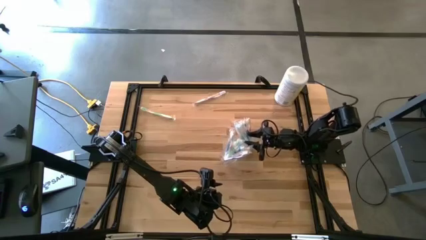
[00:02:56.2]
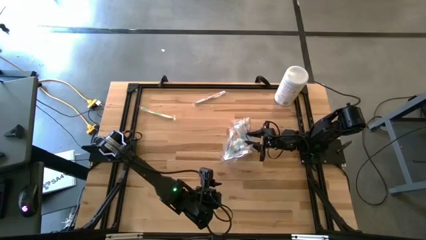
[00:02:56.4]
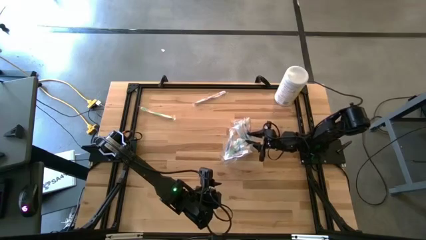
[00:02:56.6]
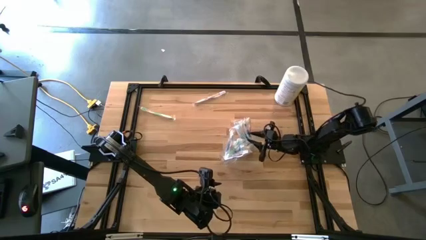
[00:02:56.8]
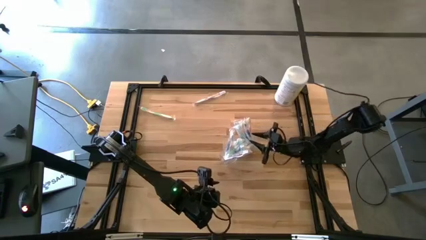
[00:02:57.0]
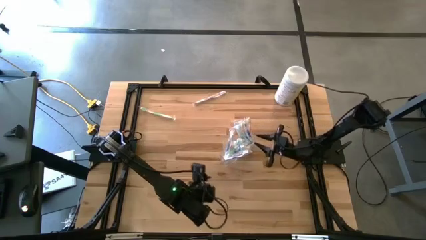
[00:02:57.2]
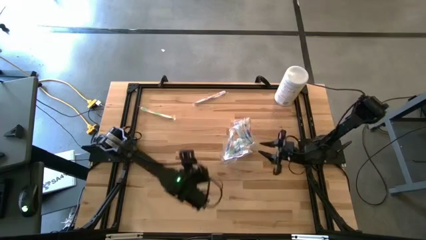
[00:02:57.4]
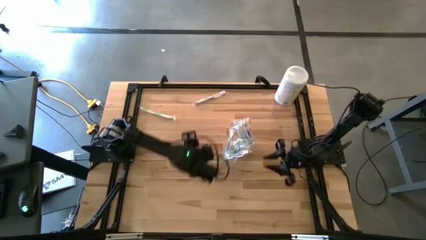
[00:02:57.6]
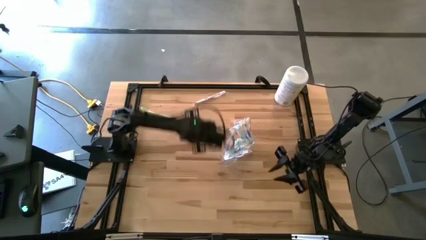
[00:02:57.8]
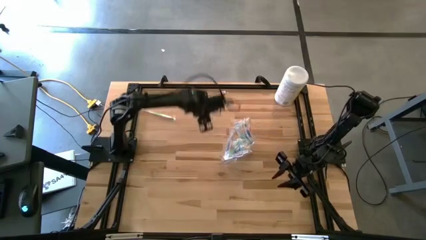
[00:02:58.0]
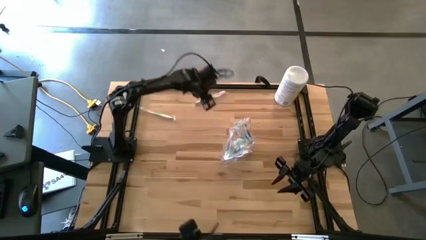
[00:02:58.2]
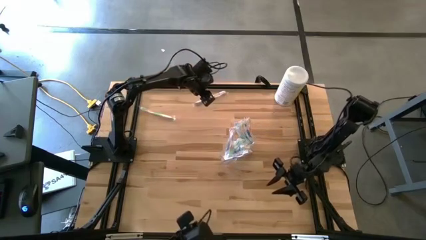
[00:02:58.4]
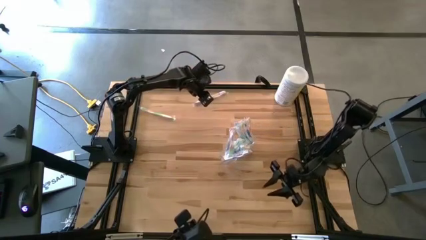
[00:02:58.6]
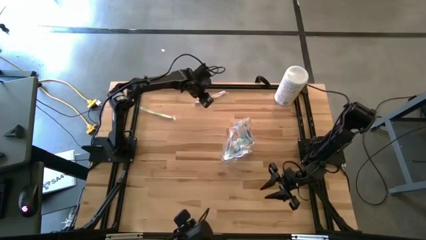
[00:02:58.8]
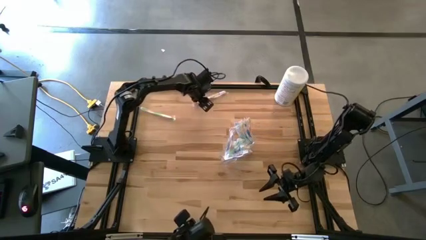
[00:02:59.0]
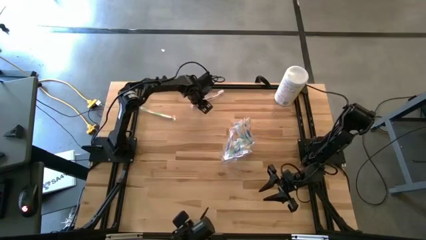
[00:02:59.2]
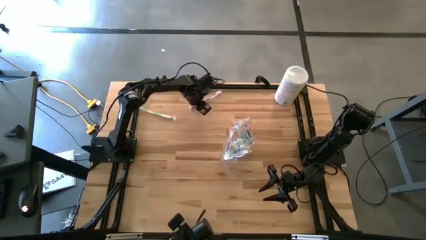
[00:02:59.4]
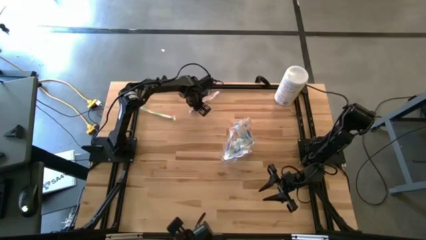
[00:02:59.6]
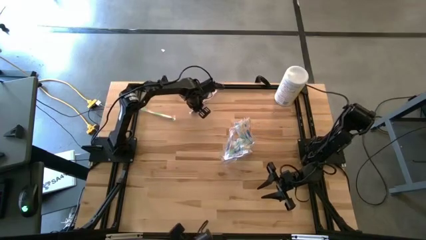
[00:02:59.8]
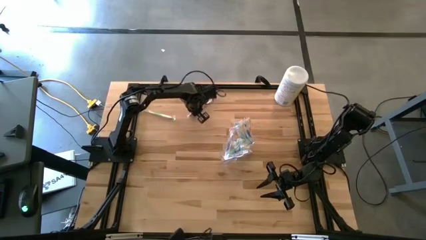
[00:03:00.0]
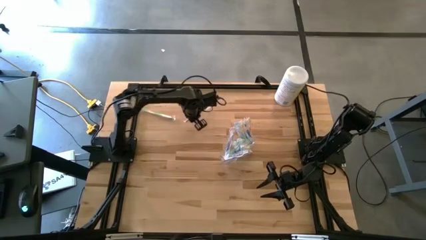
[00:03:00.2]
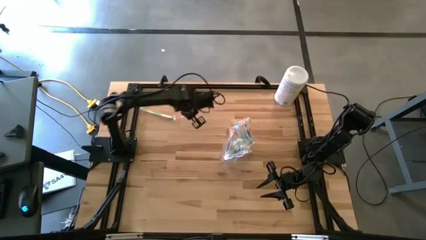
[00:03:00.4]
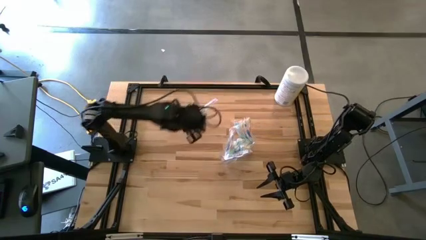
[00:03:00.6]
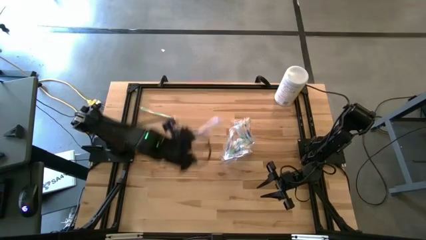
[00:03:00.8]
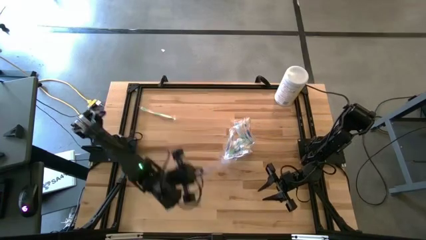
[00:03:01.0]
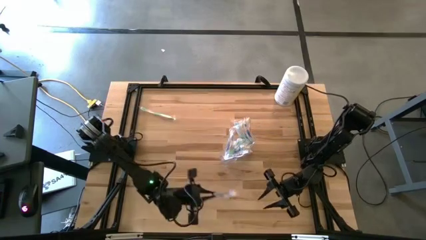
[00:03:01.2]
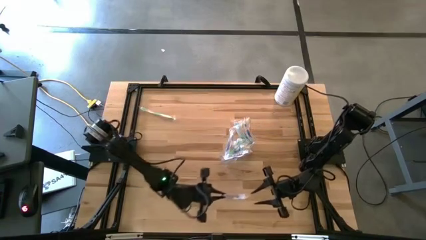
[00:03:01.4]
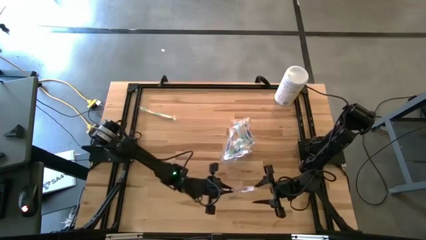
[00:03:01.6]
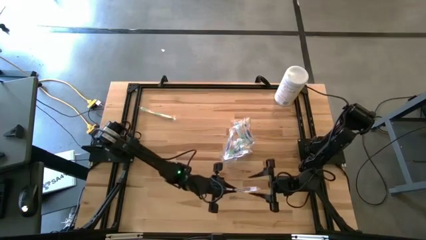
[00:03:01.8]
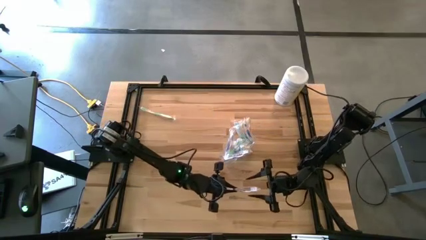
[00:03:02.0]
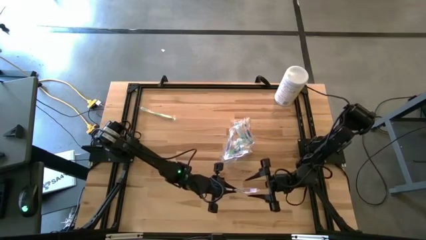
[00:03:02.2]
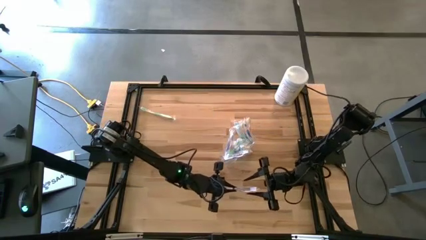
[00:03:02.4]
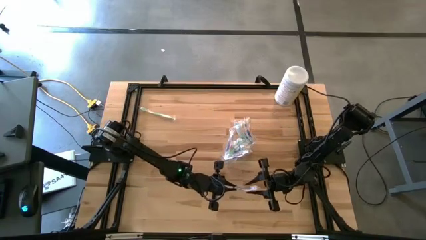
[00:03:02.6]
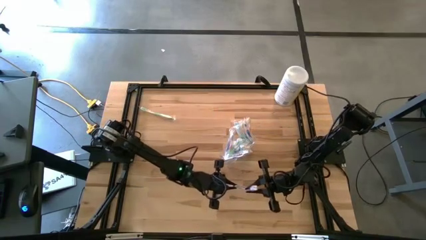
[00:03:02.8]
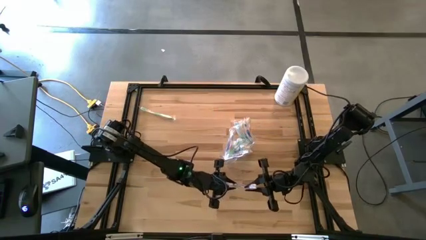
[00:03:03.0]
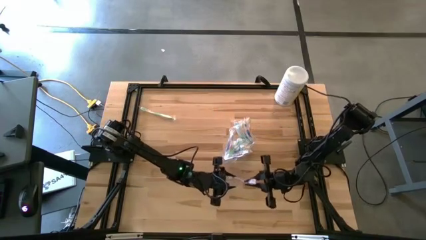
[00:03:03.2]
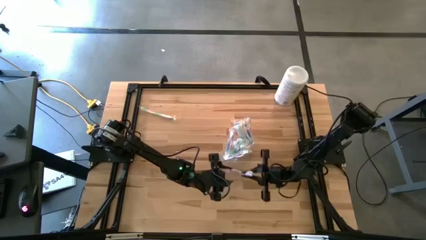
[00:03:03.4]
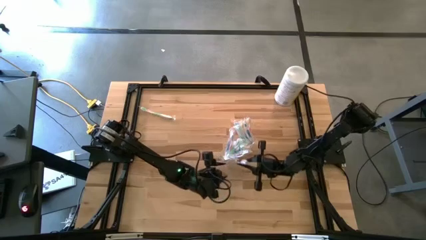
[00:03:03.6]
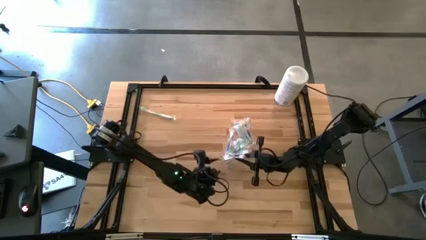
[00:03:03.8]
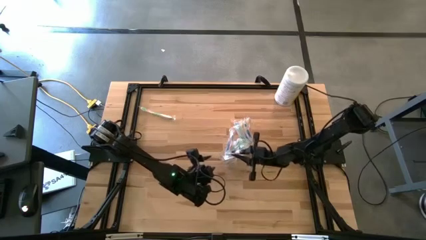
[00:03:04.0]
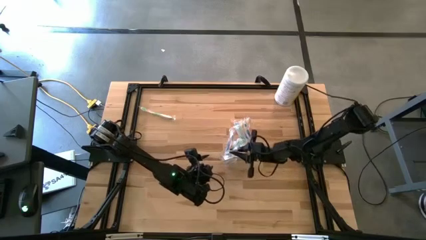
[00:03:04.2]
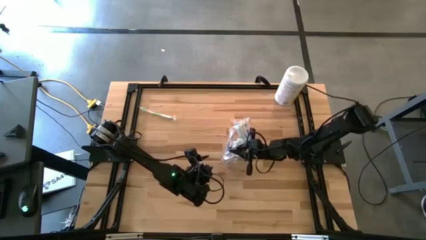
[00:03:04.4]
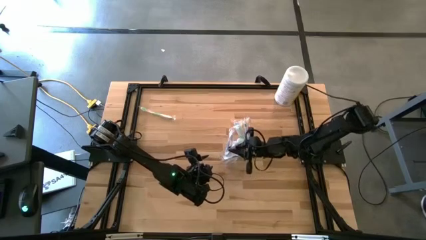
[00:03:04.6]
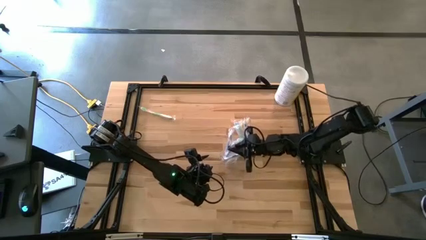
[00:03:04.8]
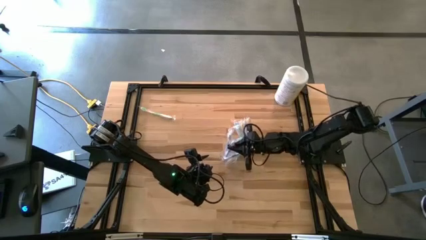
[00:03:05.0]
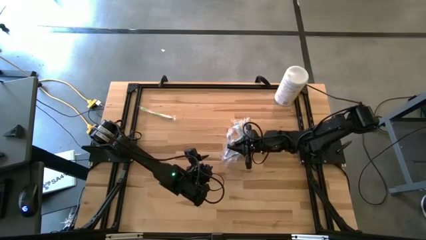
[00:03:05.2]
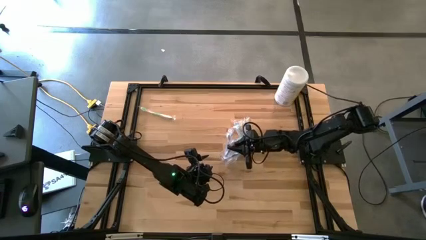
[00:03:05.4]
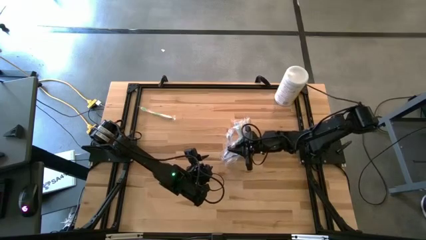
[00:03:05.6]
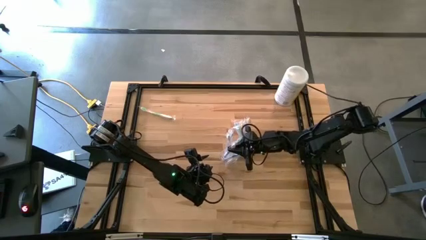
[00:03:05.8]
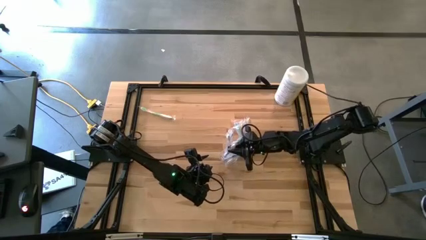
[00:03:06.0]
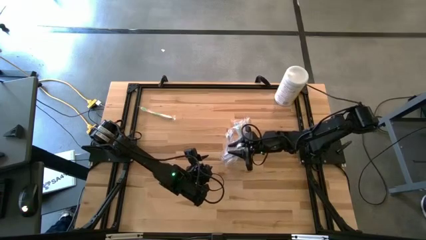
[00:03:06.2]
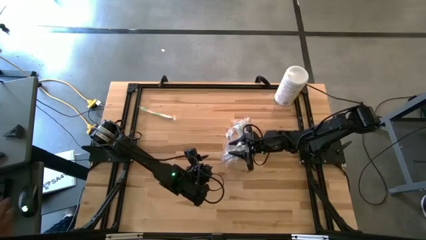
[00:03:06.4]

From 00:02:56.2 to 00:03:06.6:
Task: Pick & Place toothbrushing station
Put the purple toothbrush into the transparent organizer
